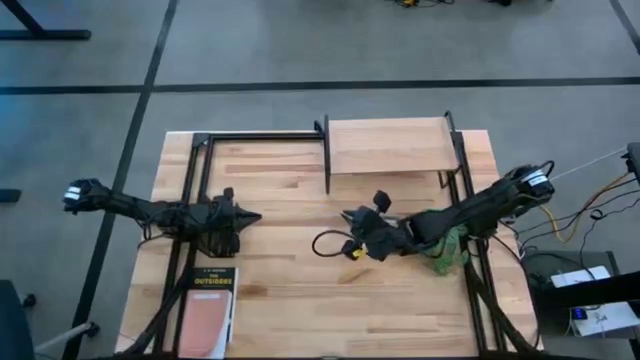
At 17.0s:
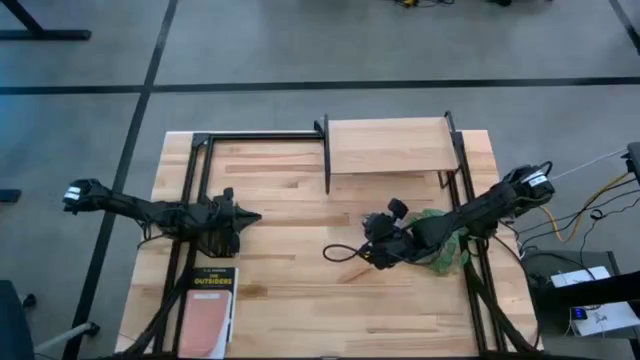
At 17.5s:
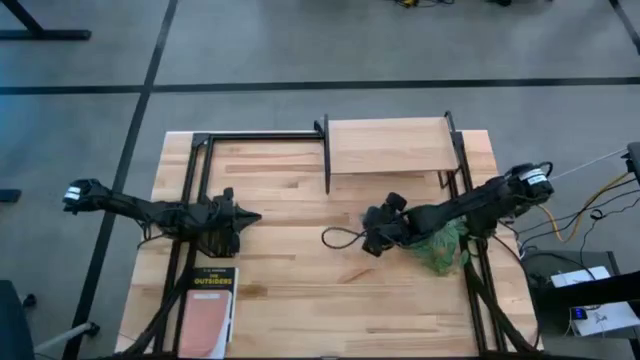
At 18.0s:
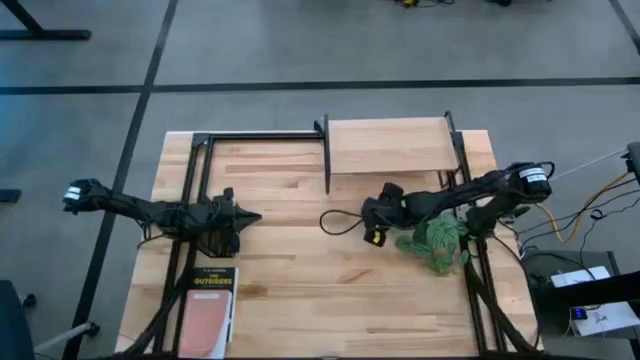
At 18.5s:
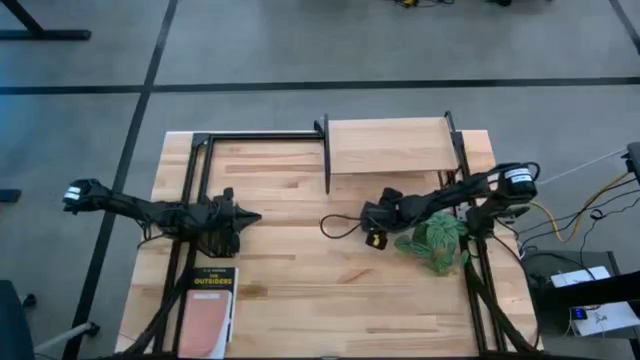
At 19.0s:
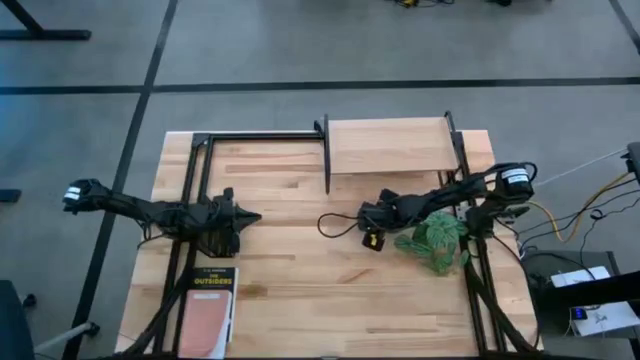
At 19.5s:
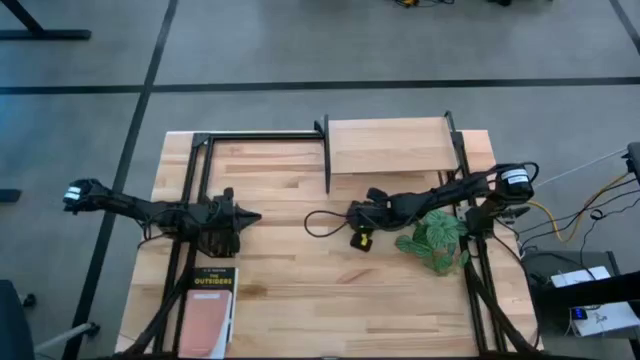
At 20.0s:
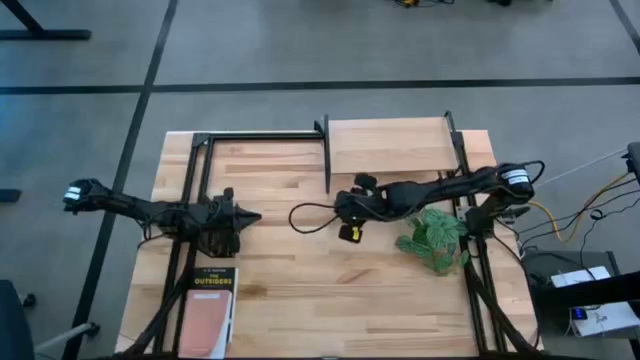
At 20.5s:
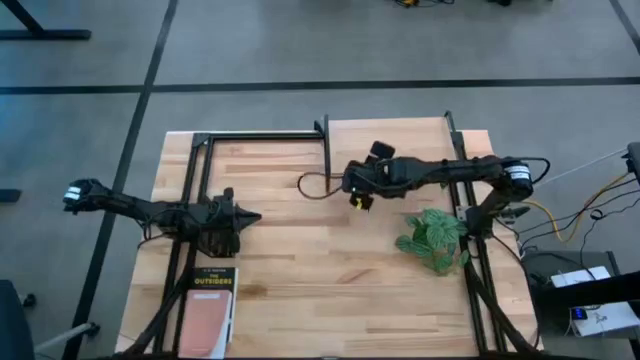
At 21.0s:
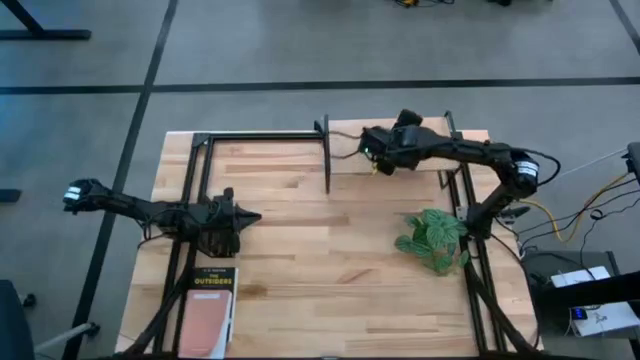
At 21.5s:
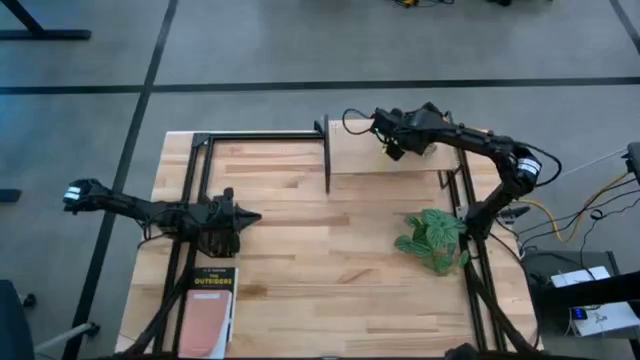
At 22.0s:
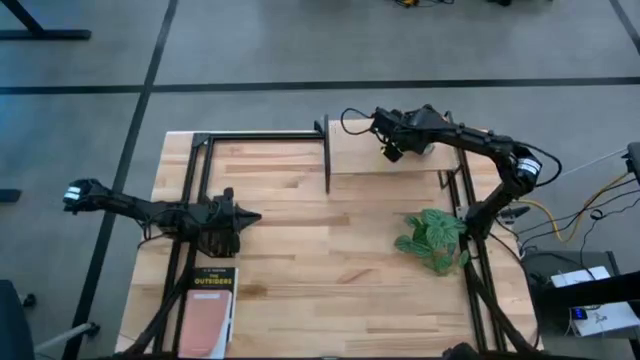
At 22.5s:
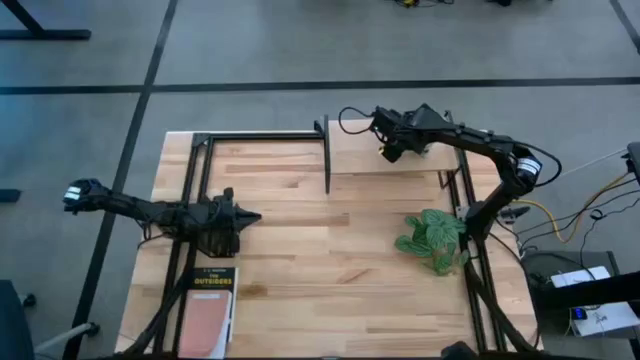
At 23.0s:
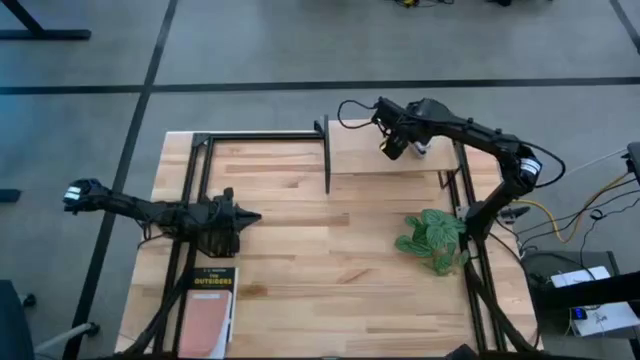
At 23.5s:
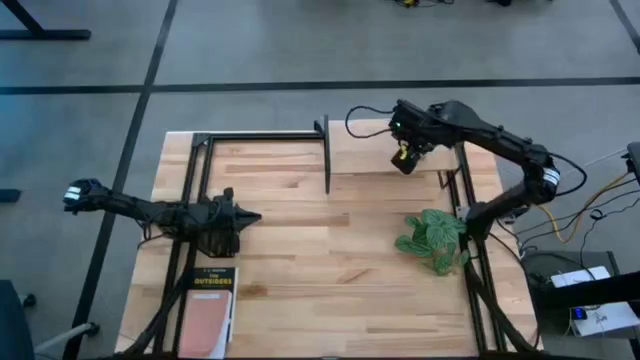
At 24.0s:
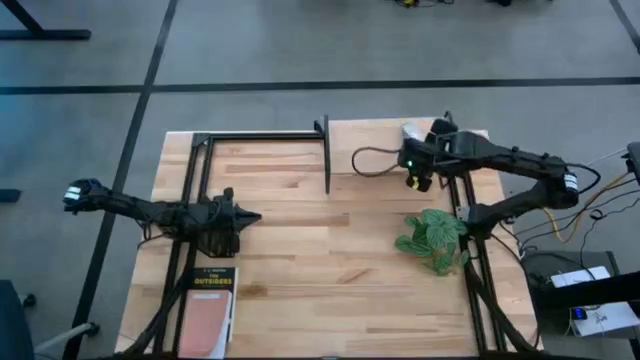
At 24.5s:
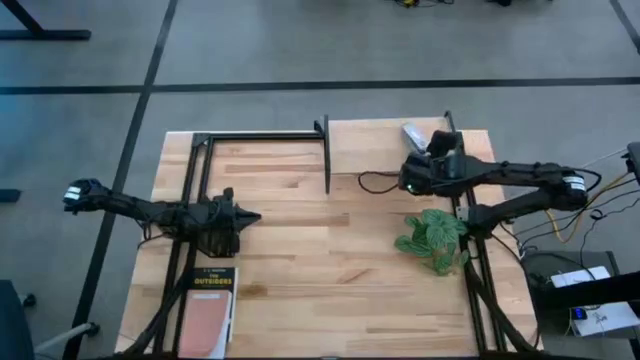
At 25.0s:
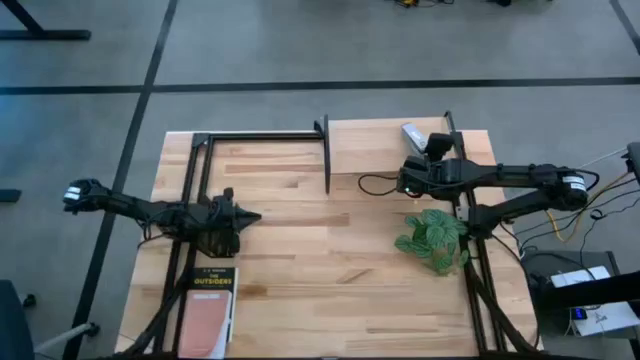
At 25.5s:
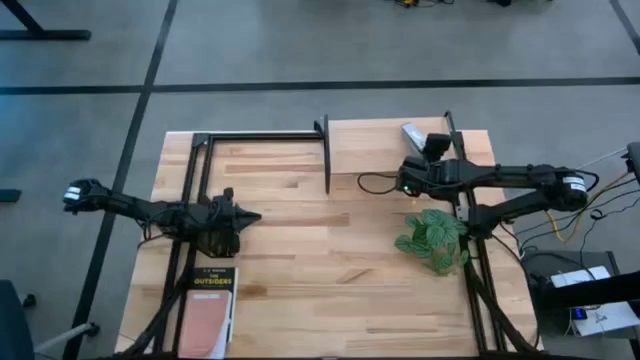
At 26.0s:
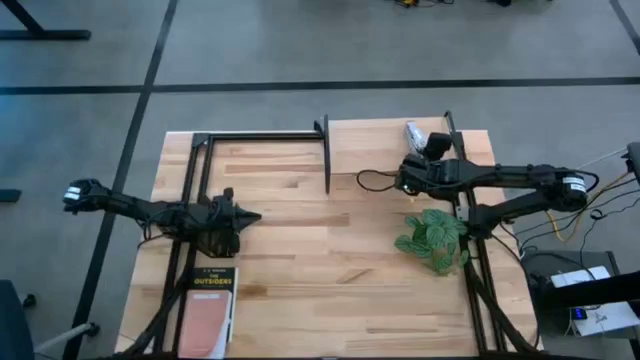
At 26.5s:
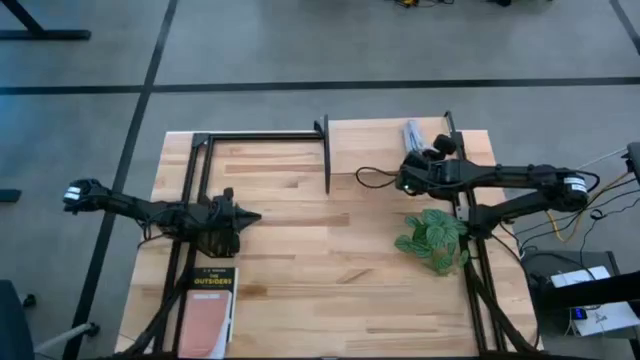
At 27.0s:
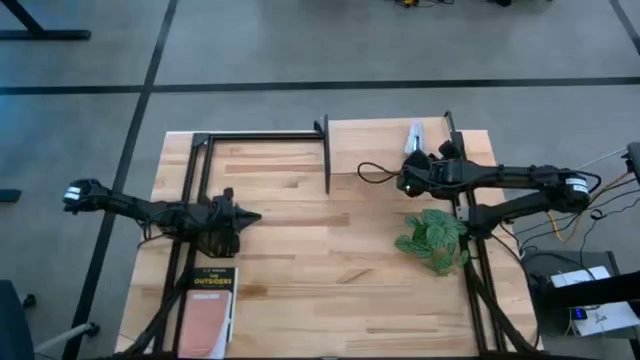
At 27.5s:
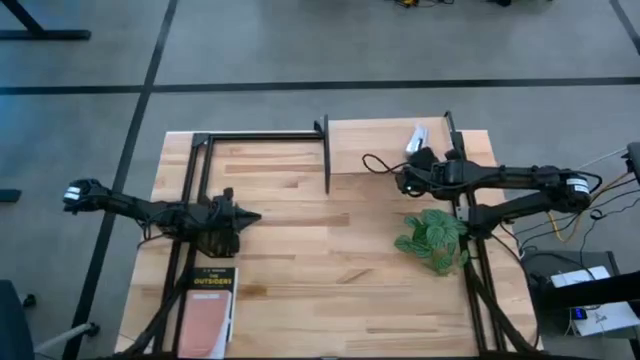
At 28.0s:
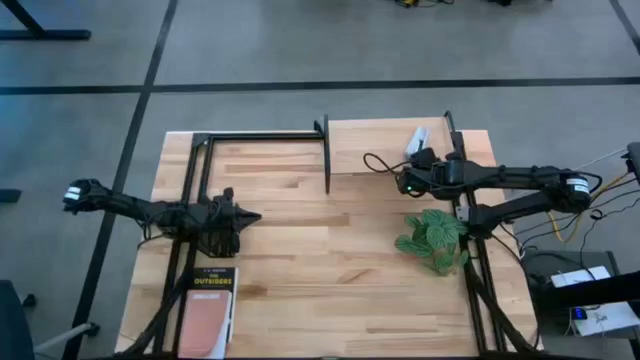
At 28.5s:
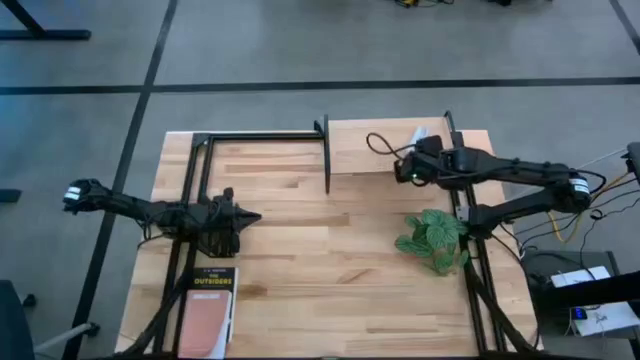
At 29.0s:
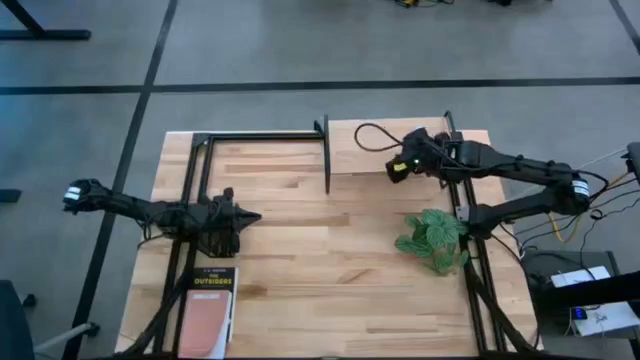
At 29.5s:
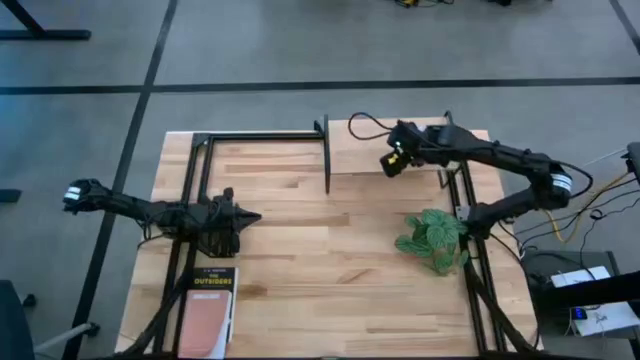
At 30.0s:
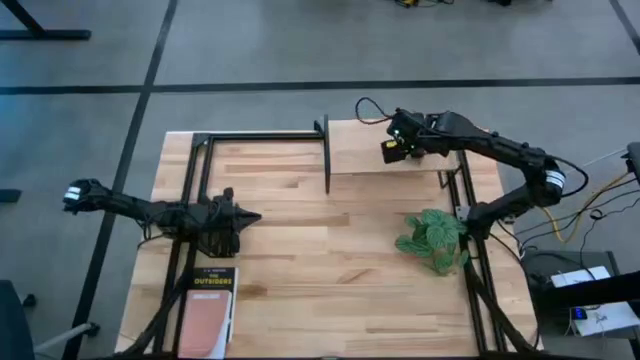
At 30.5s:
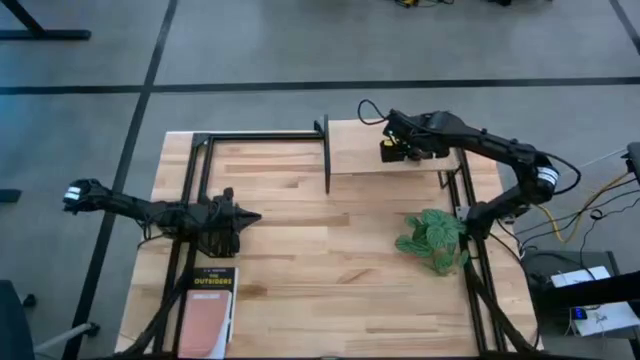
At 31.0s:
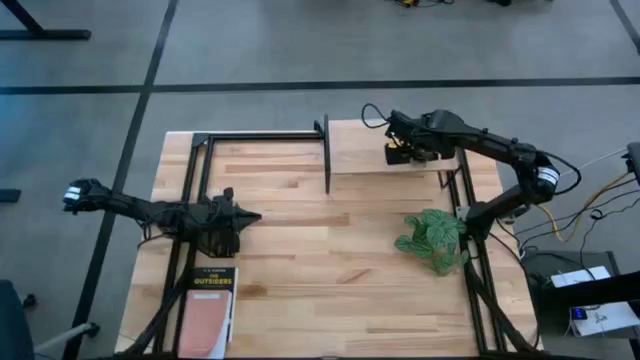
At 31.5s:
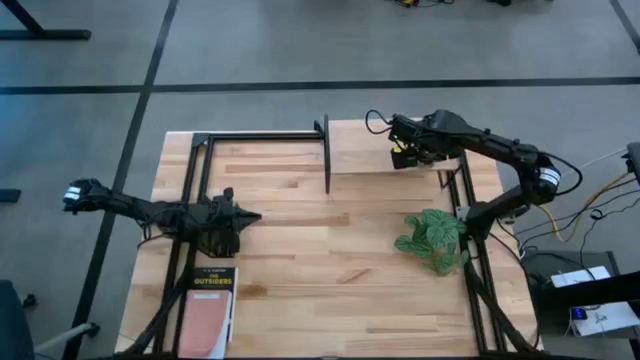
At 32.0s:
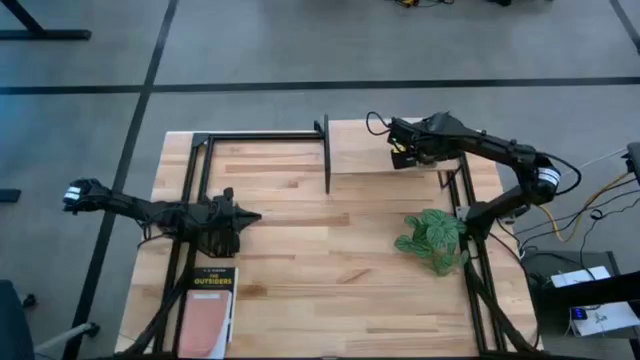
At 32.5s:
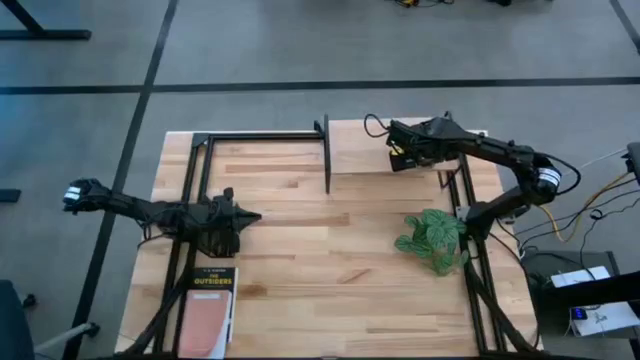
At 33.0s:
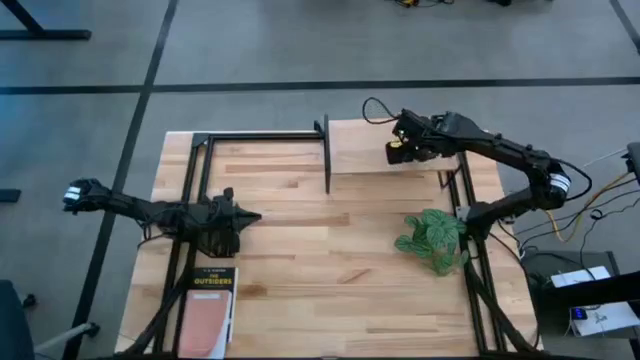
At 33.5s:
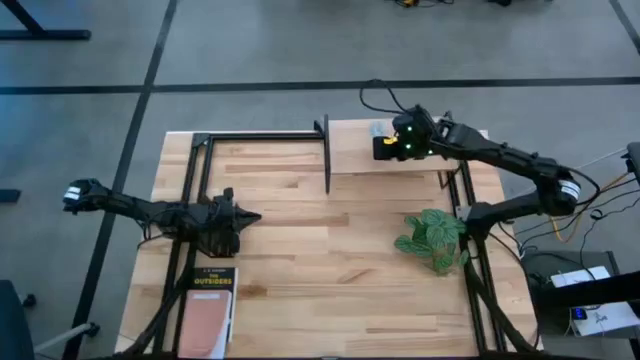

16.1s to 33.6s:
Task: Stock shelves
Put the gray stapler on the shelf

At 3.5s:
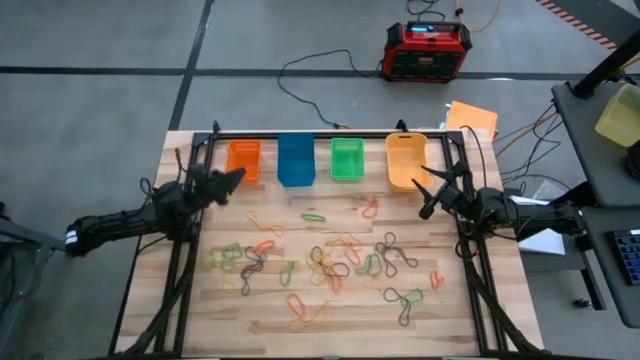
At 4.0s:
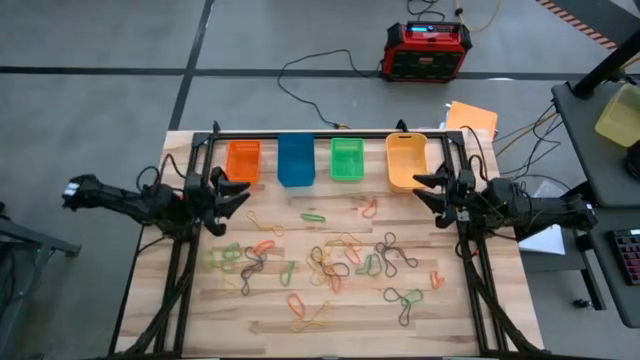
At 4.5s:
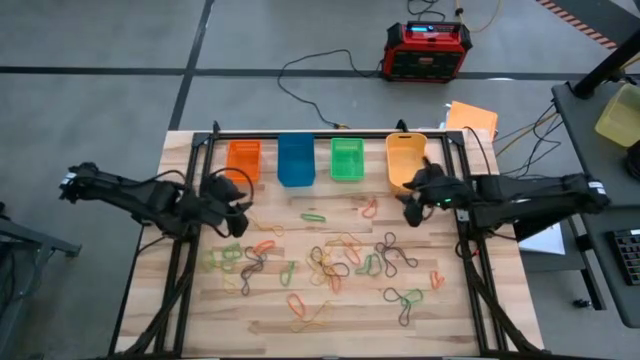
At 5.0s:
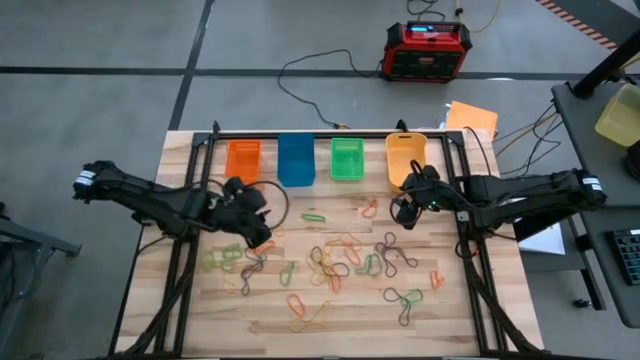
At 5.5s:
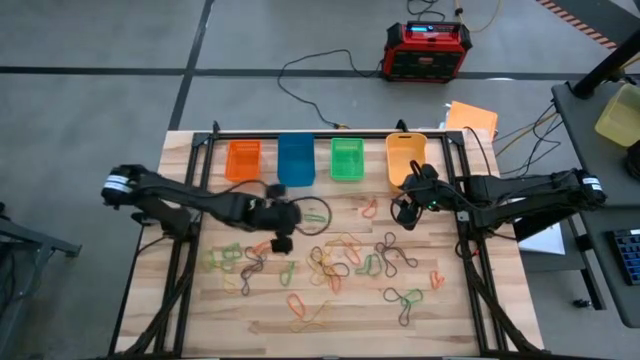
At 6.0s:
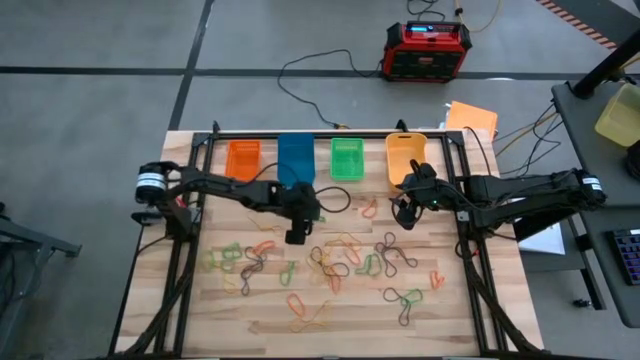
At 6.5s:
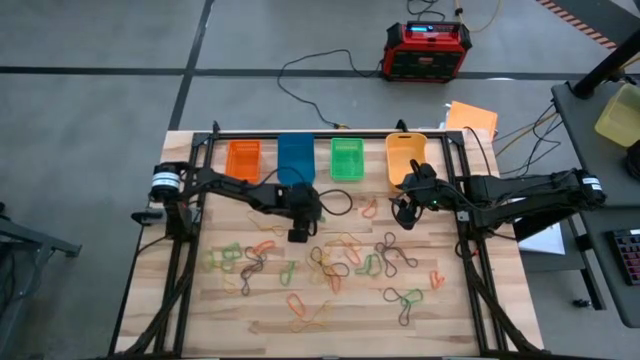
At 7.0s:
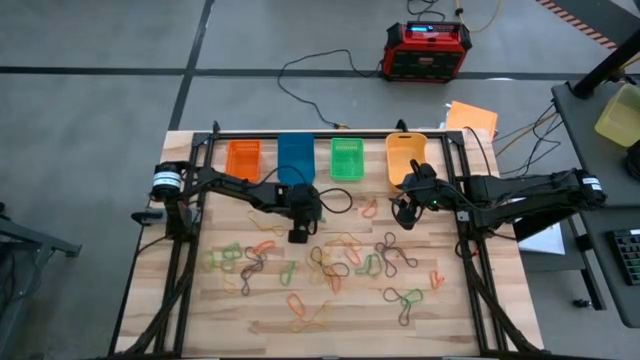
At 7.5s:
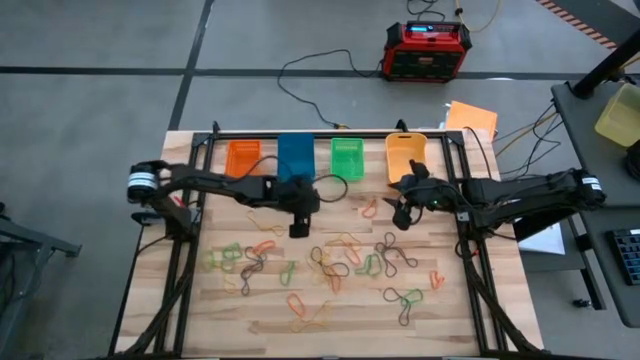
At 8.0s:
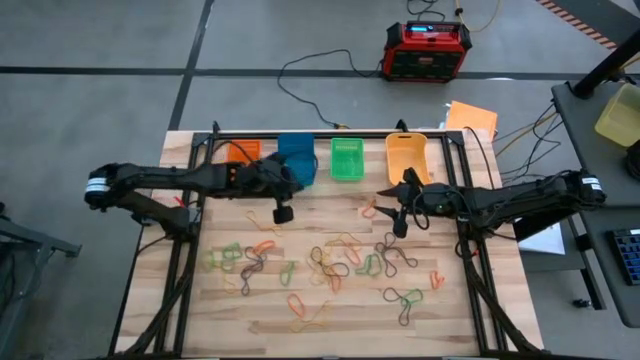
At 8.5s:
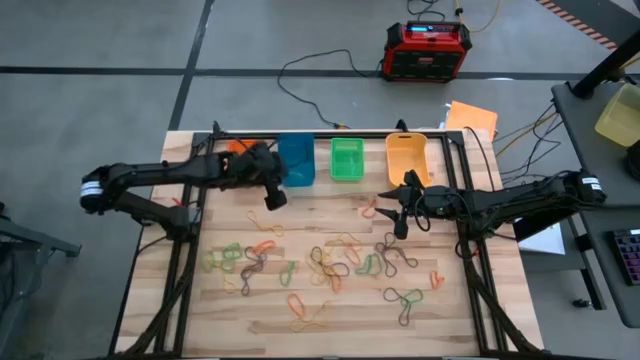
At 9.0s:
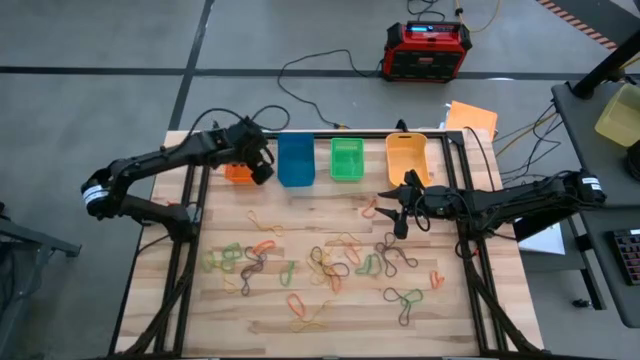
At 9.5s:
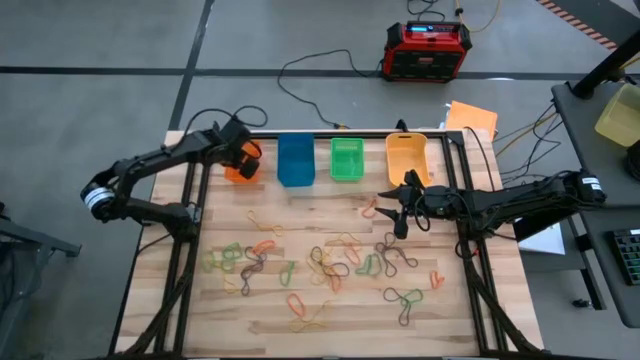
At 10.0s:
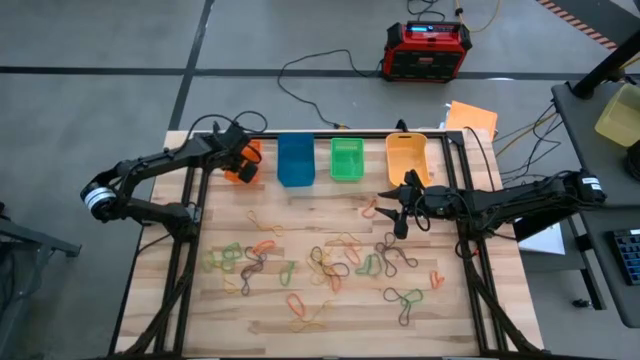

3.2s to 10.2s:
Task: Sort rubber bands into baskets
Put the green rubber band into the orange bin
